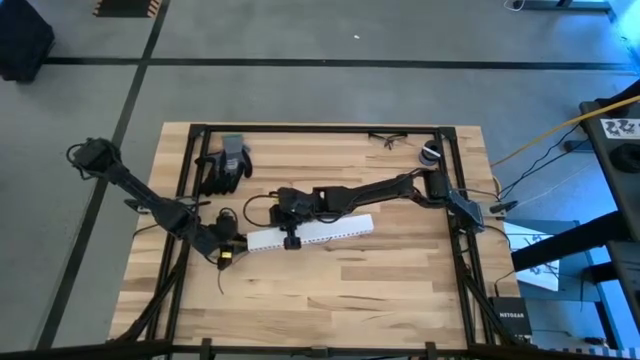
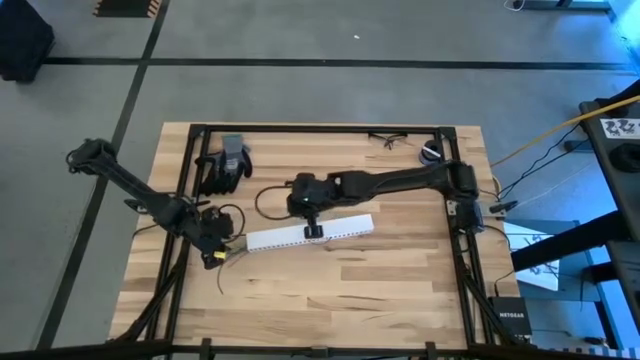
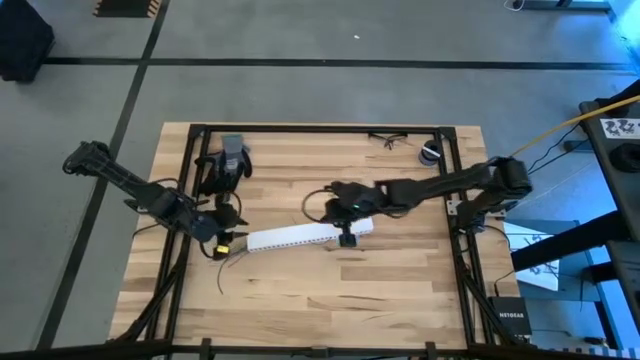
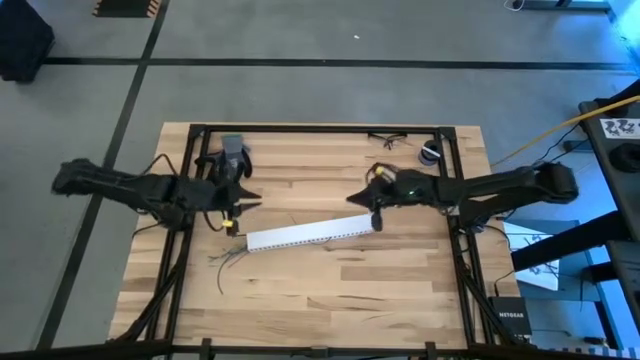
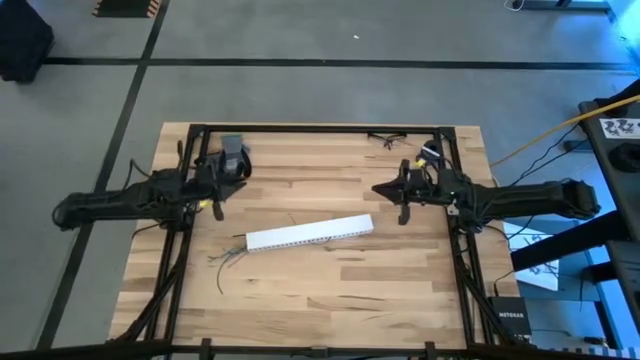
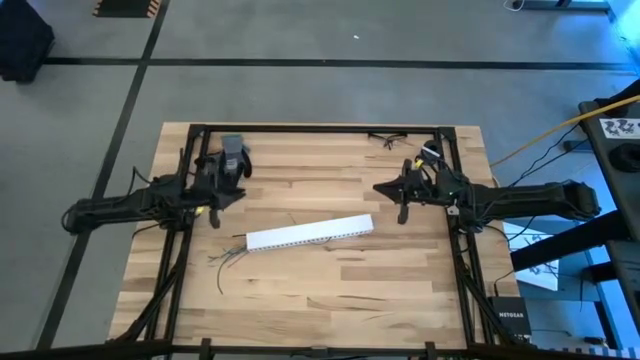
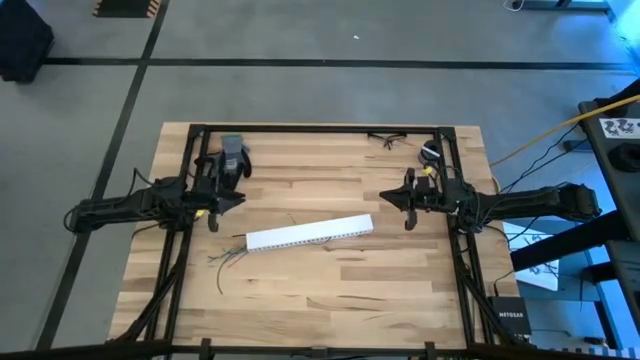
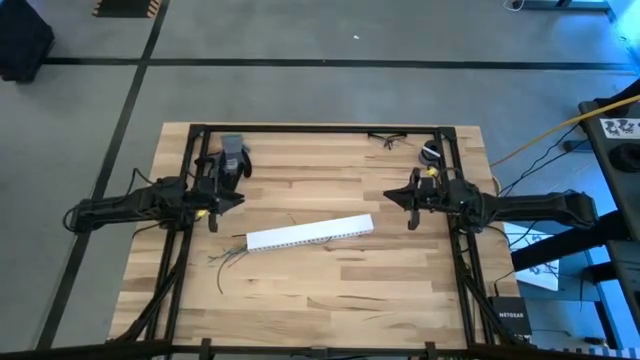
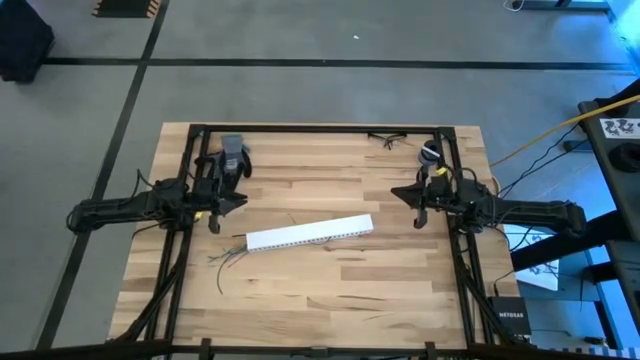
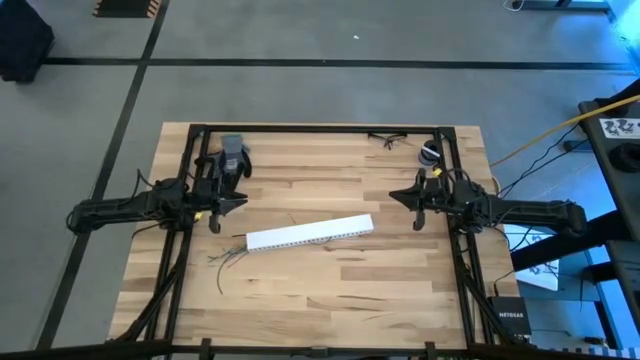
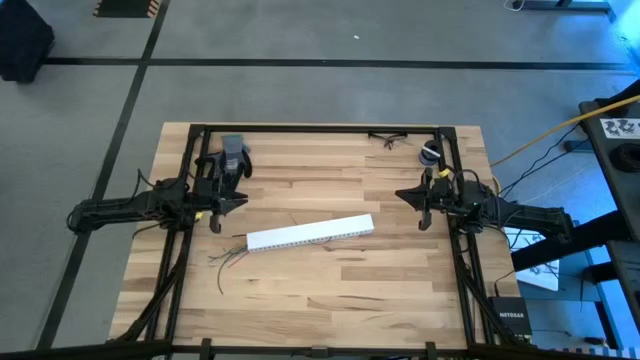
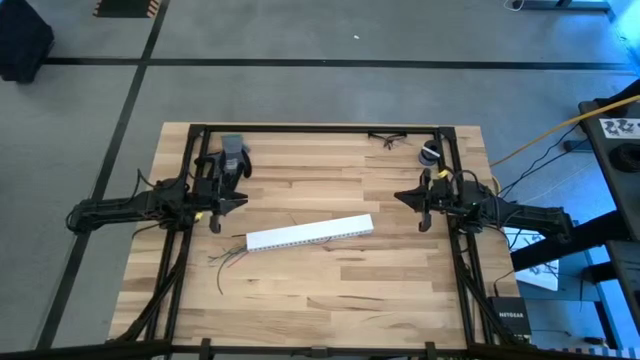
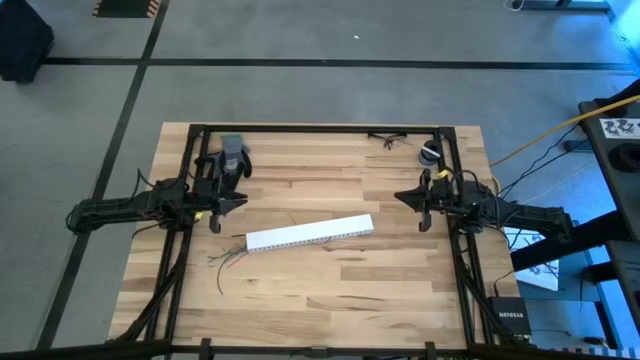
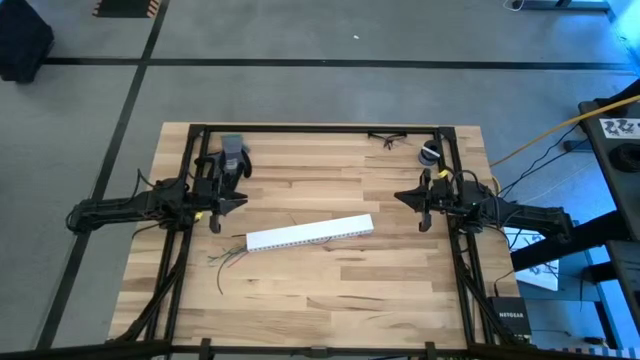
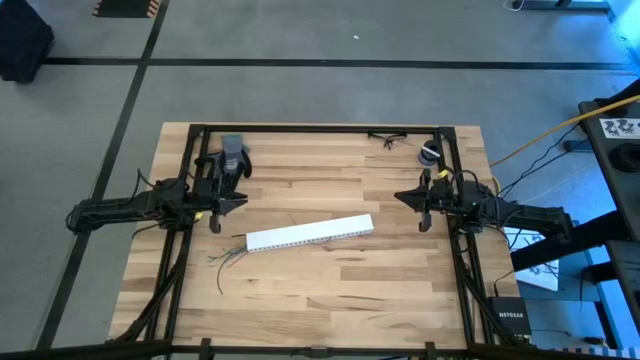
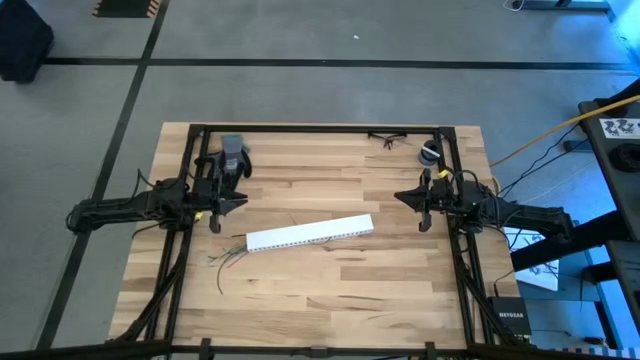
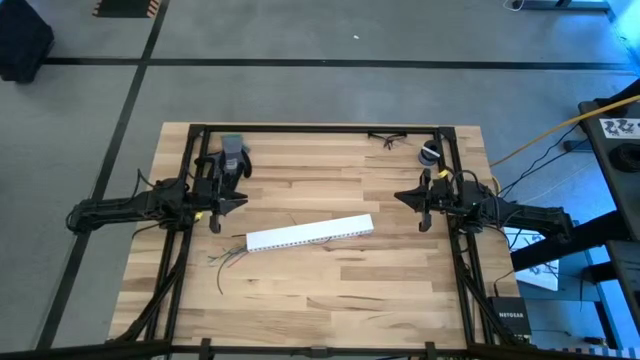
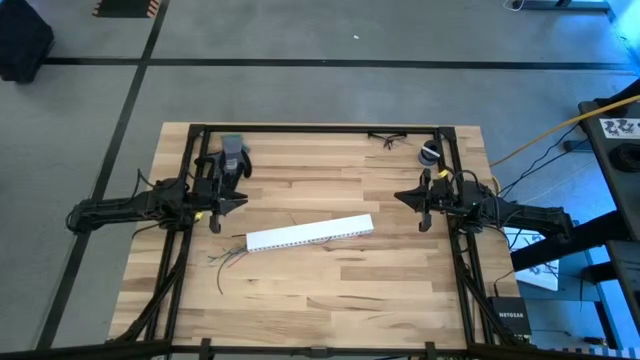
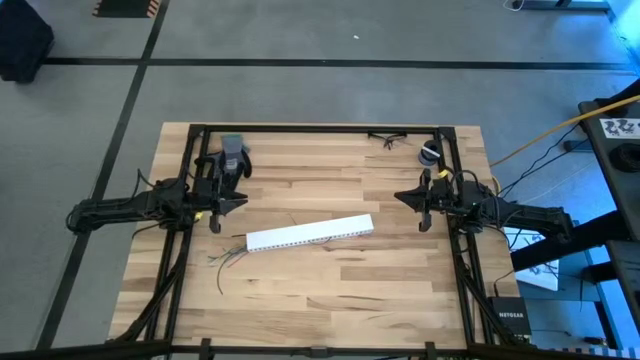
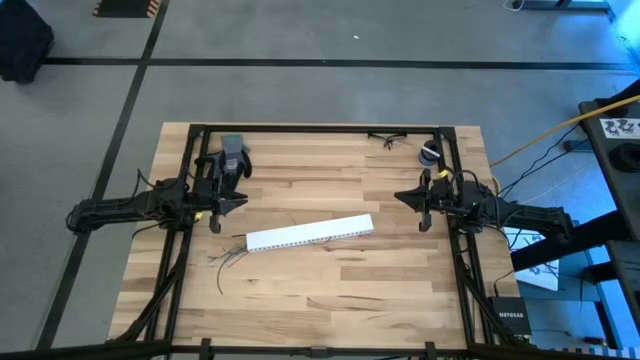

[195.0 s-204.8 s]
Task: Ziptie cables
Return to Home Position

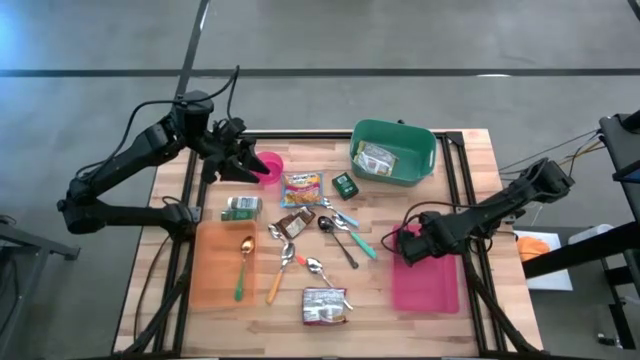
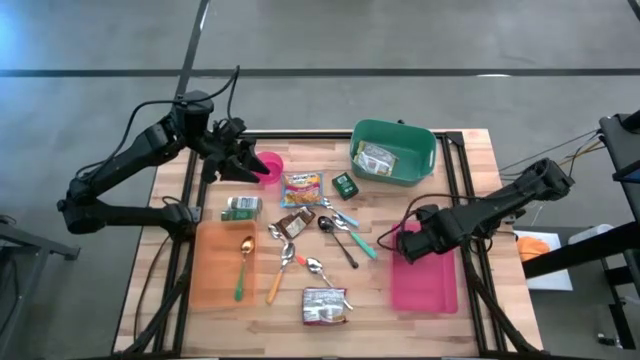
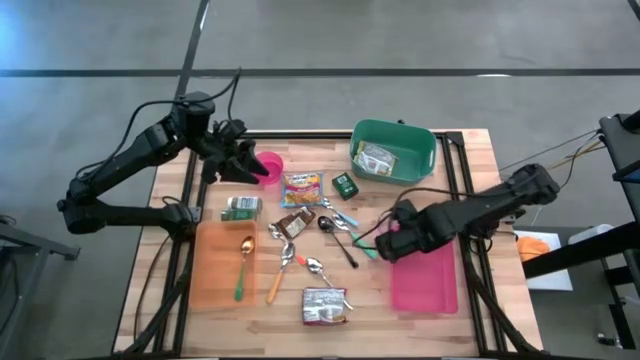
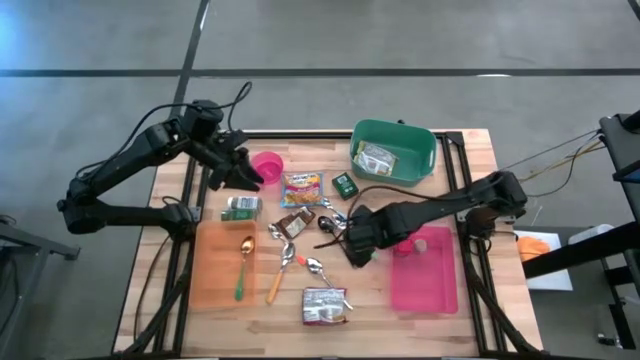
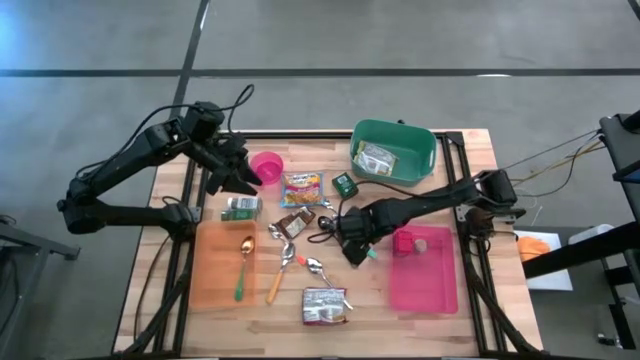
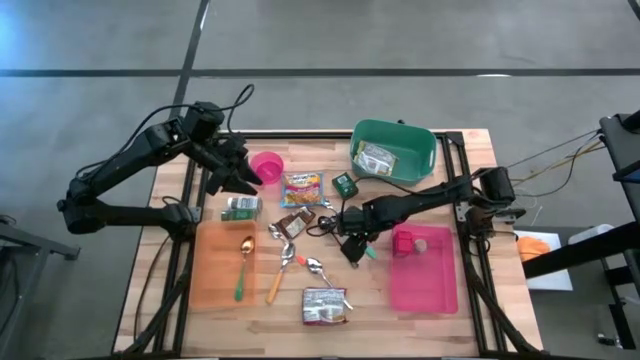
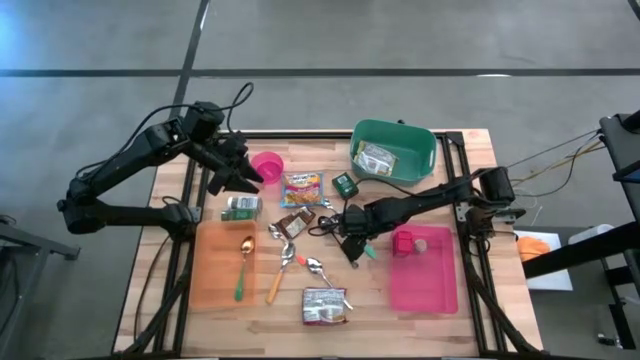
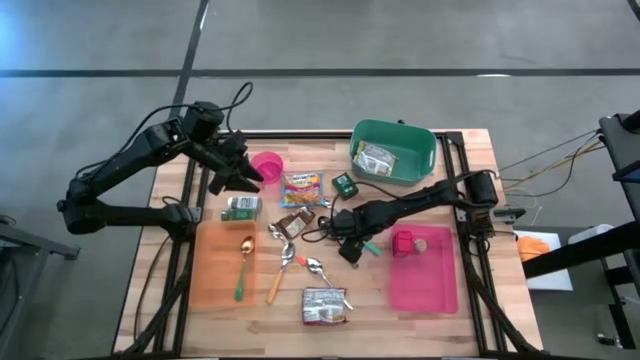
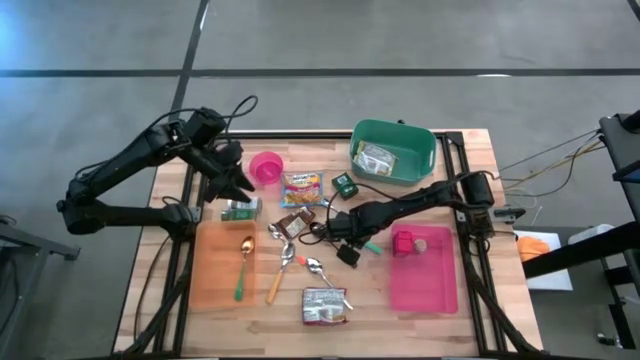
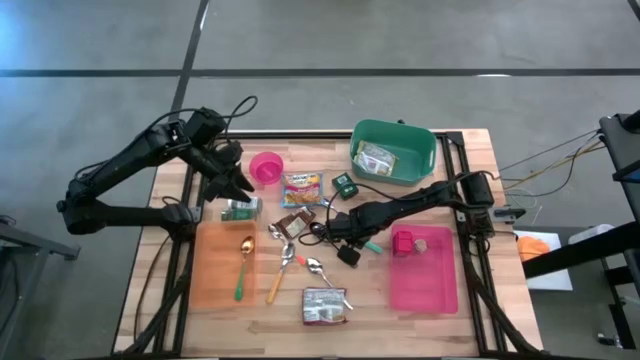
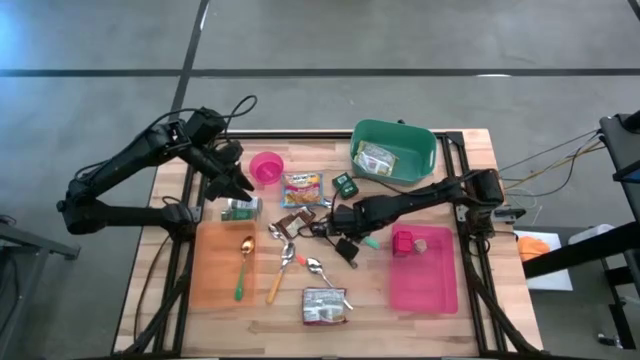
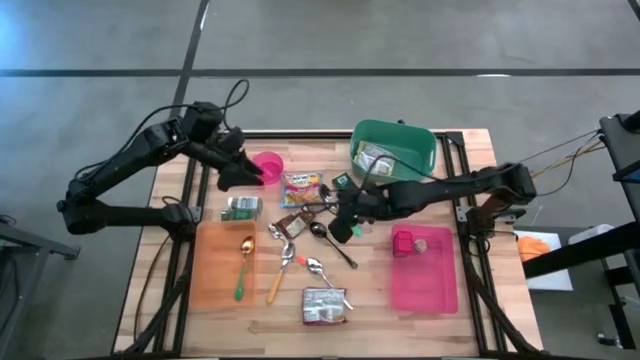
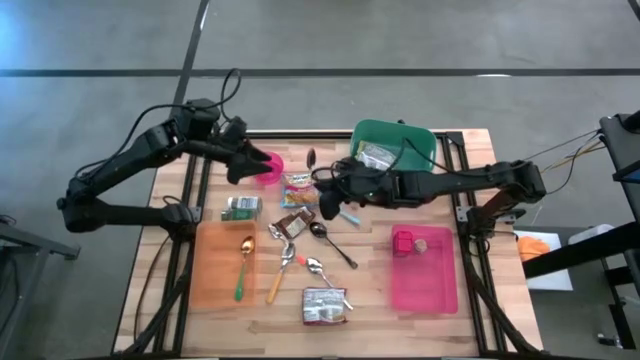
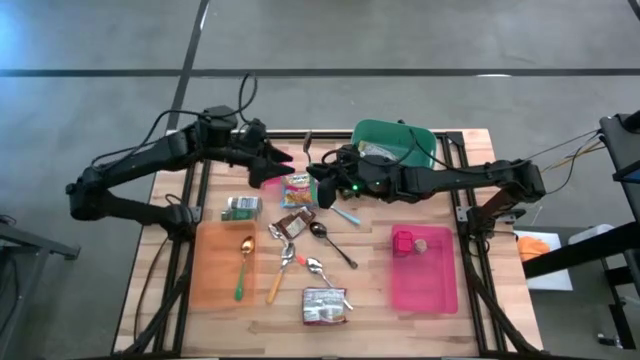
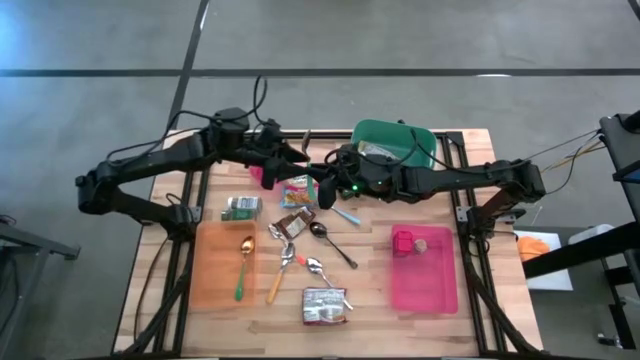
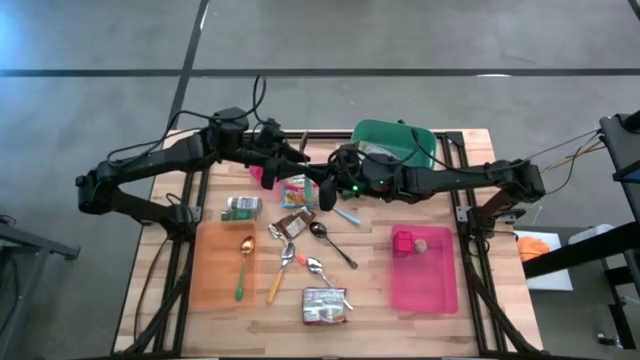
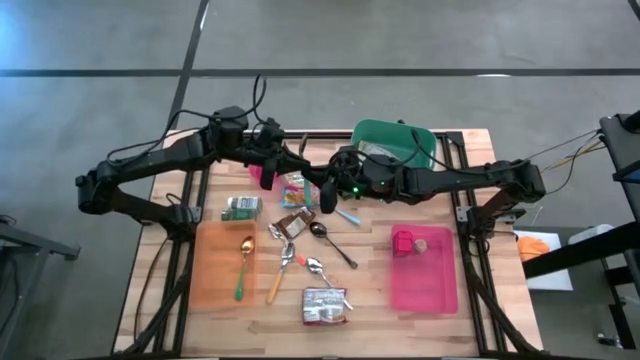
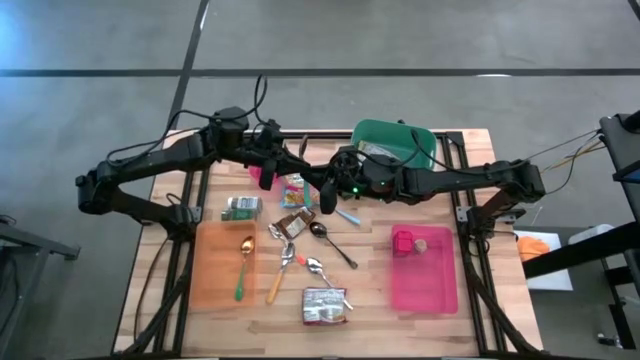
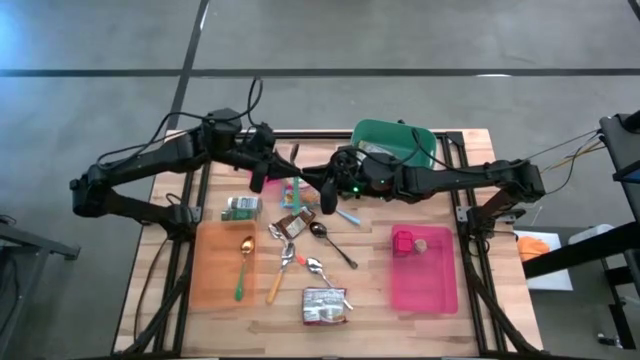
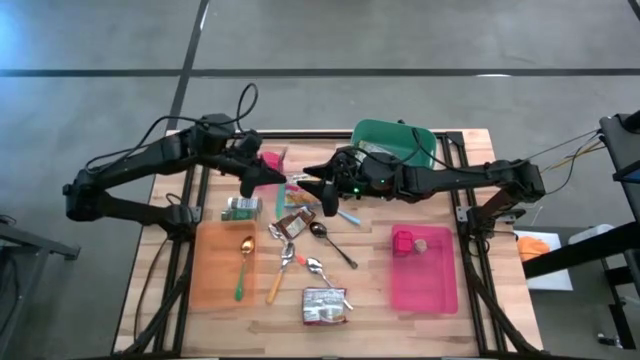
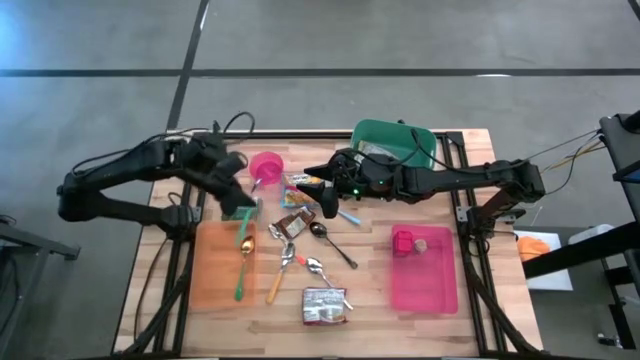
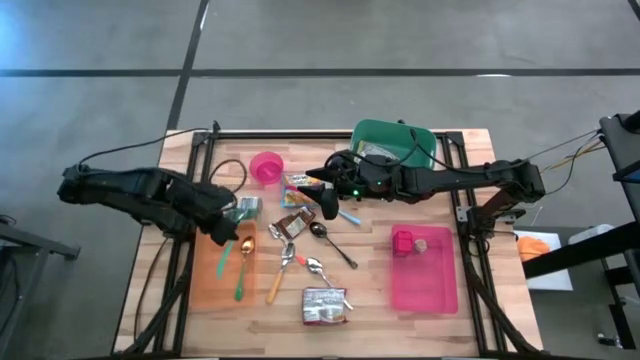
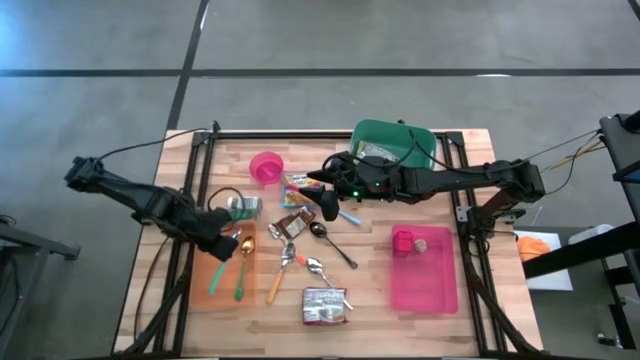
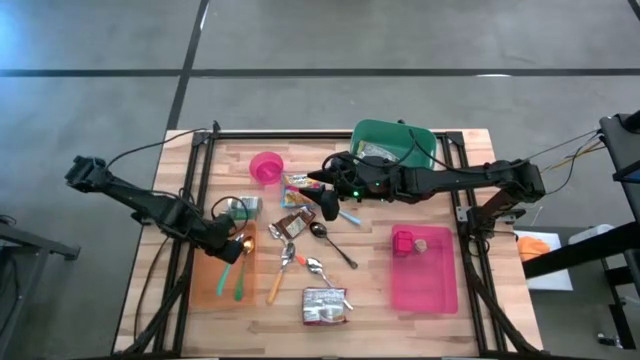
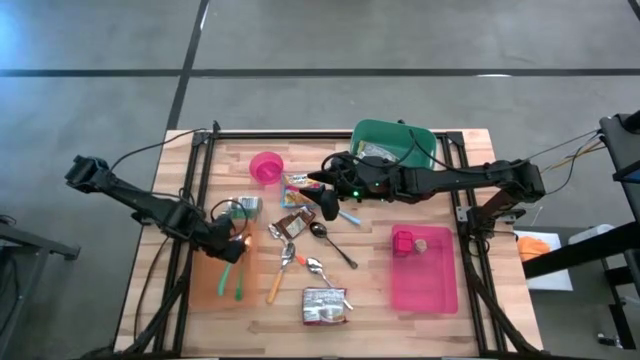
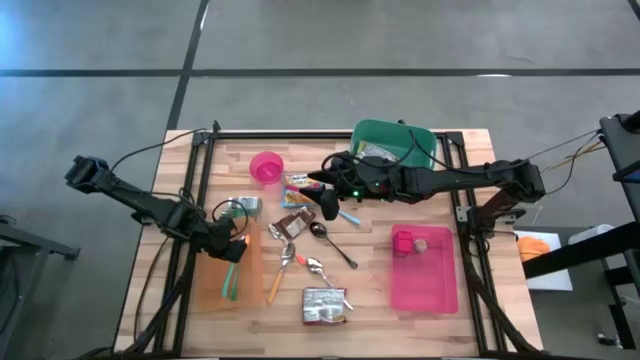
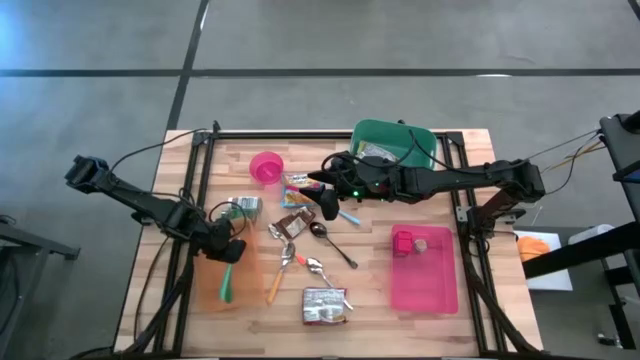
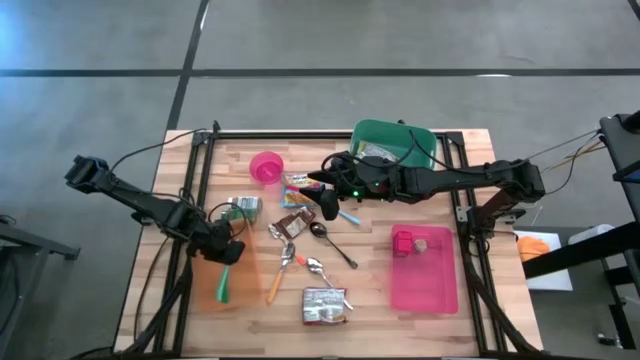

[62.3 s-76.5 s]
Task: Pick & Place Food Item
Put the light green spoon into the orange bin
